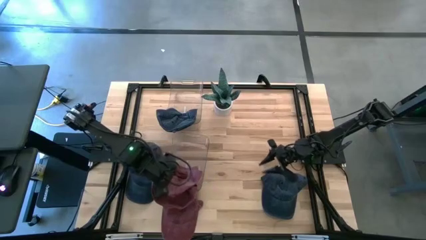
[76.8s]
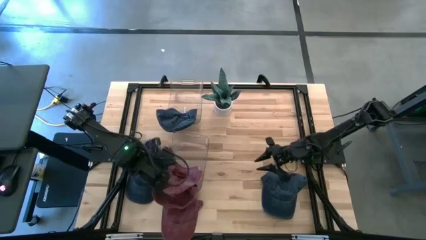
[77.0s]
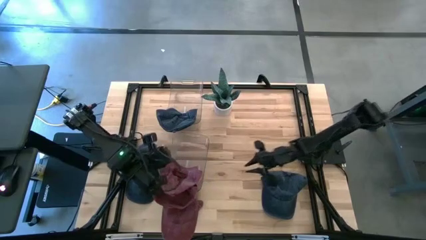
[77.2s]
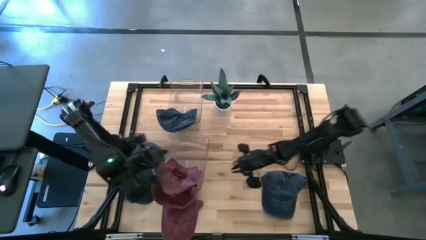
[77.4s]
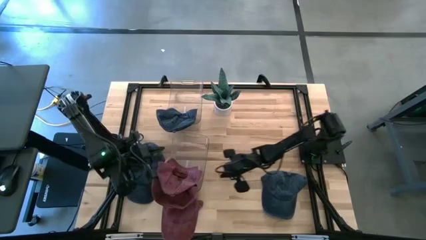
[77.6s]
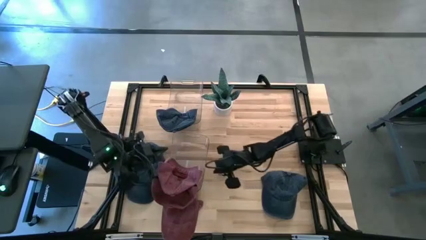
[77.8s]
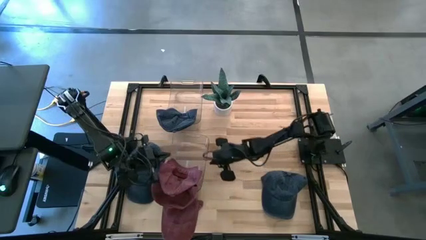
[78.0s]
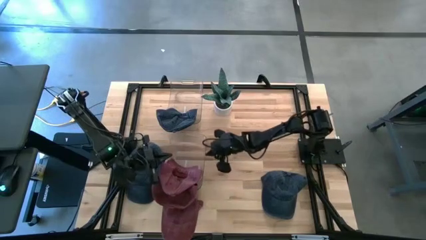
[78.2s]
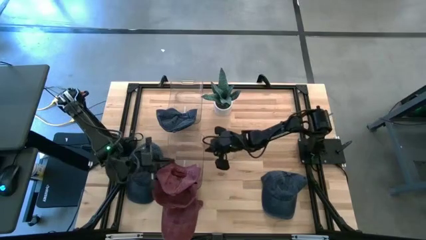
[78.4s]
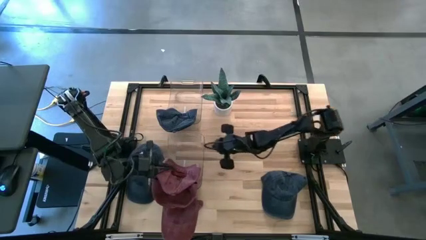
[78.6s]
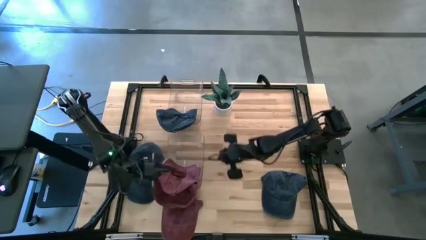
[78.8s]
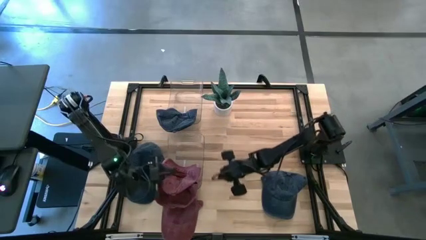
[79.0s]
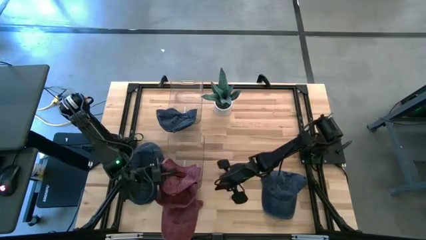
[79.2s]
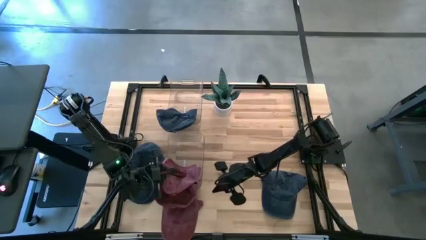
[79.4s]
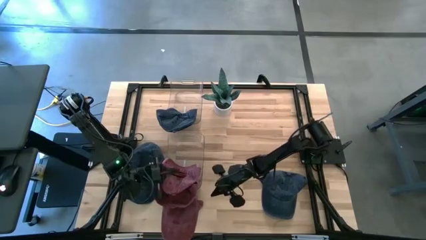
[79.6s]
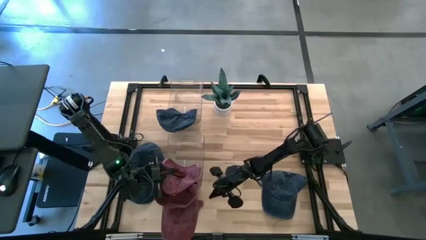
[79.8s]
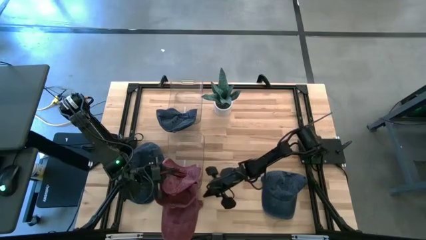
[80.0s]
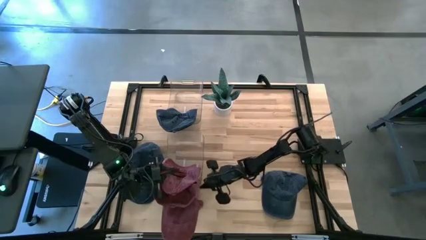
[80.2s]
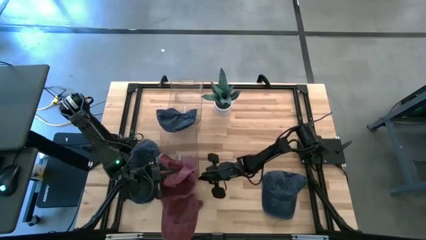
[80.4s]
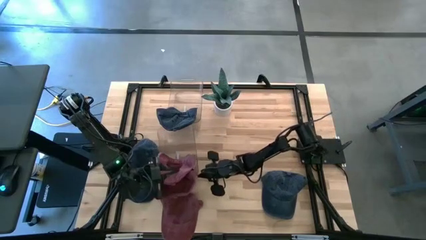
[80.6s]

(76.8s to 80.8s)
Task: Pick & Place hat
Adjust the bottom transparent bin

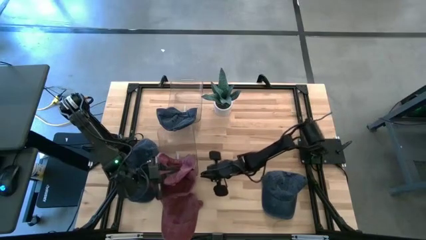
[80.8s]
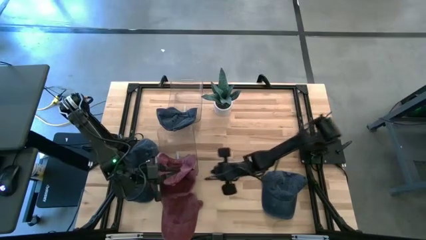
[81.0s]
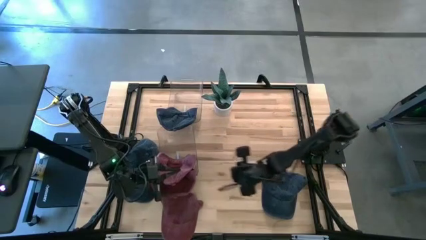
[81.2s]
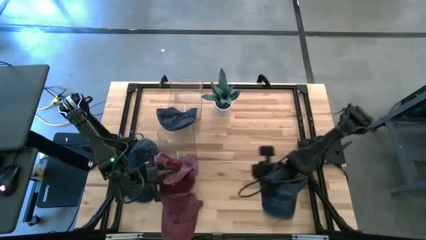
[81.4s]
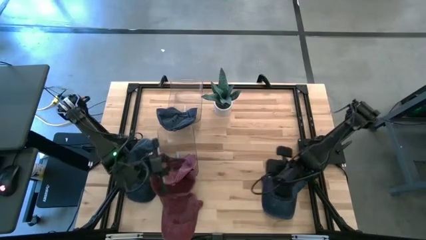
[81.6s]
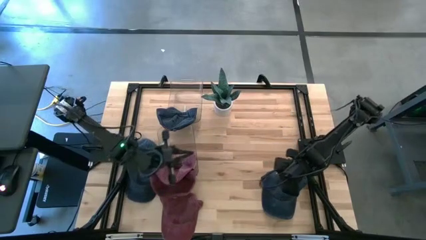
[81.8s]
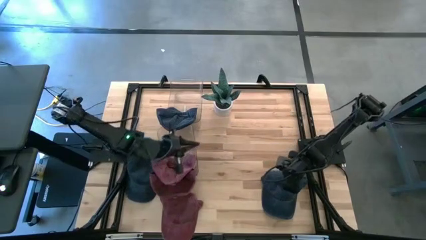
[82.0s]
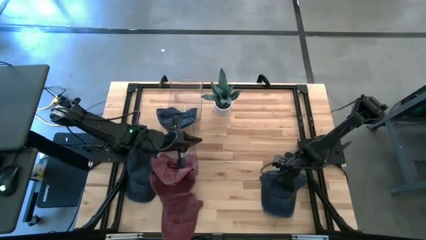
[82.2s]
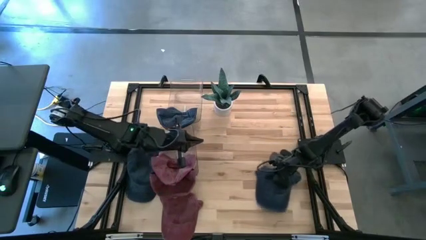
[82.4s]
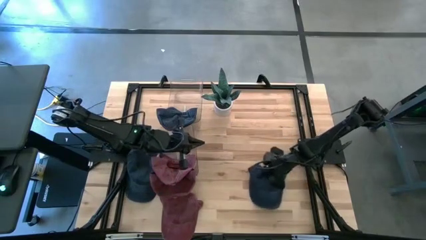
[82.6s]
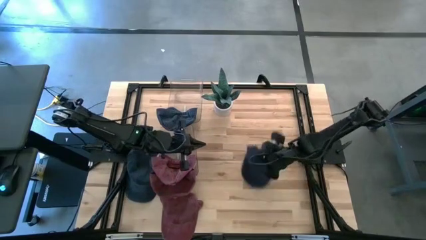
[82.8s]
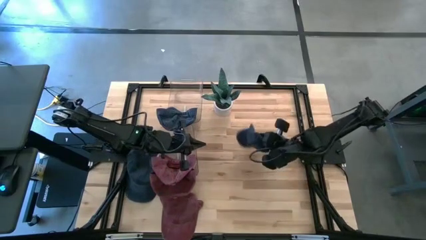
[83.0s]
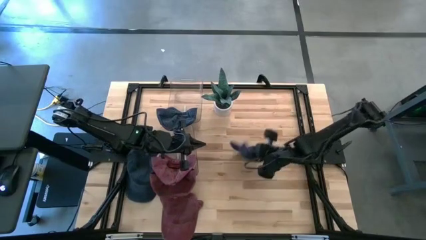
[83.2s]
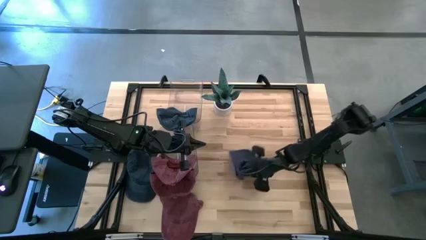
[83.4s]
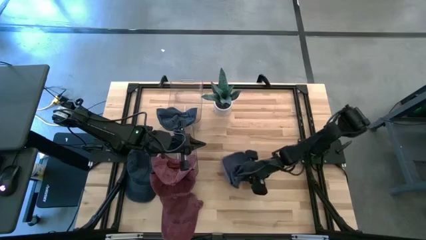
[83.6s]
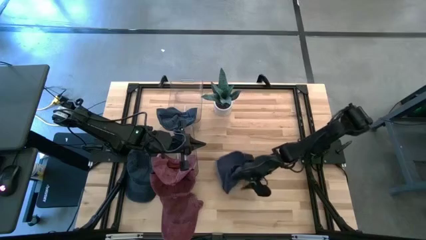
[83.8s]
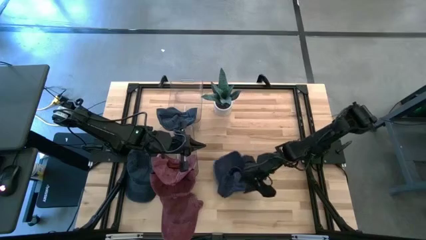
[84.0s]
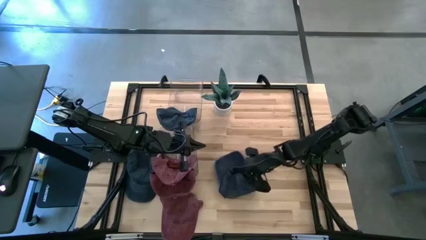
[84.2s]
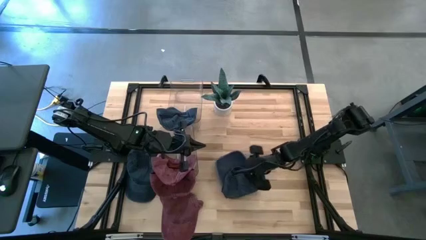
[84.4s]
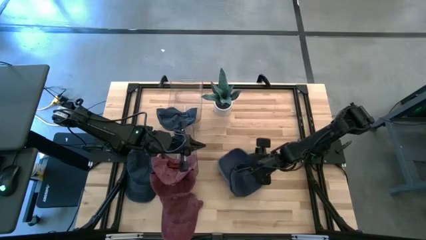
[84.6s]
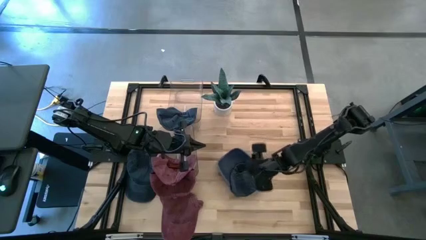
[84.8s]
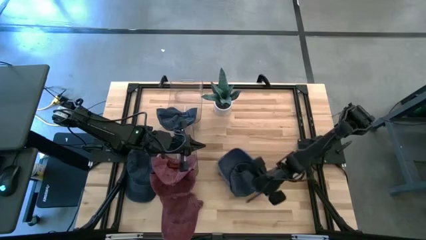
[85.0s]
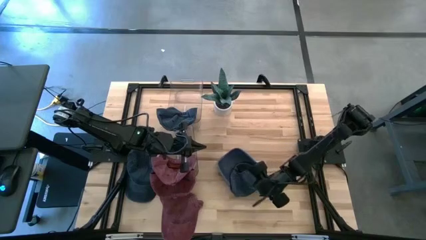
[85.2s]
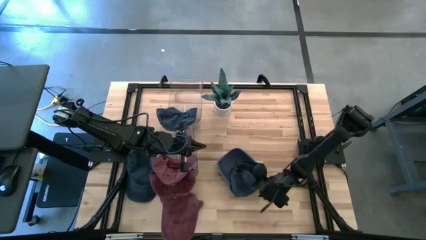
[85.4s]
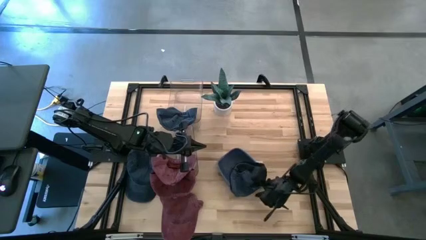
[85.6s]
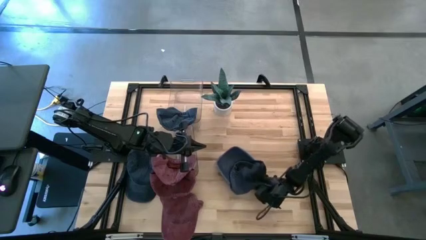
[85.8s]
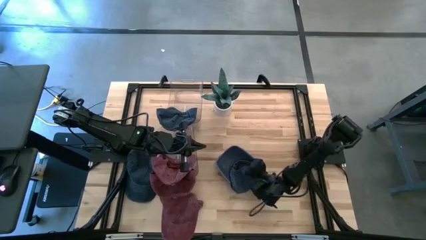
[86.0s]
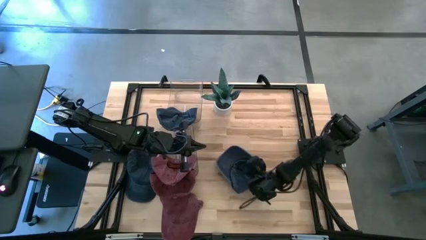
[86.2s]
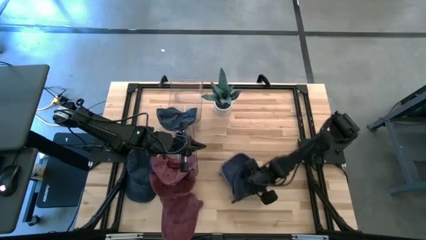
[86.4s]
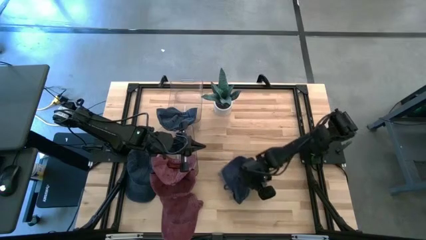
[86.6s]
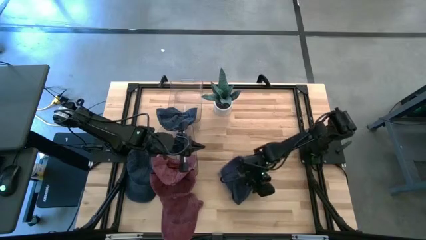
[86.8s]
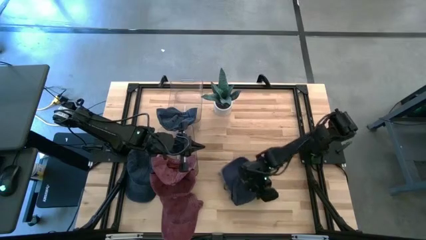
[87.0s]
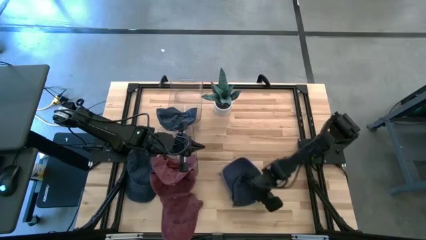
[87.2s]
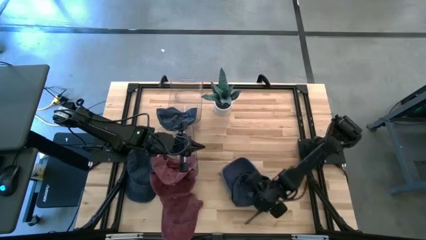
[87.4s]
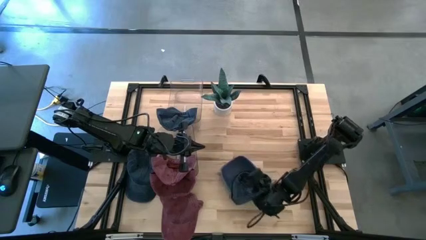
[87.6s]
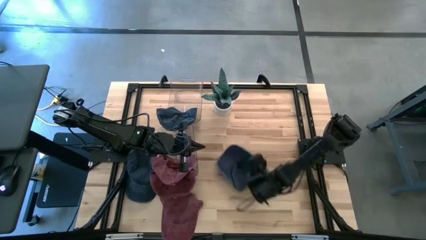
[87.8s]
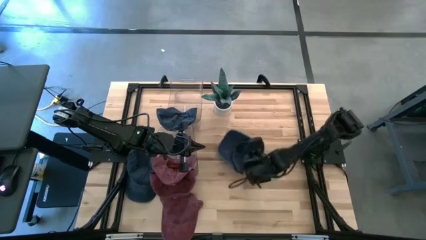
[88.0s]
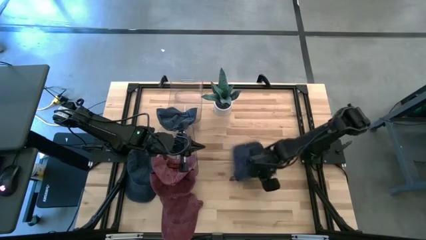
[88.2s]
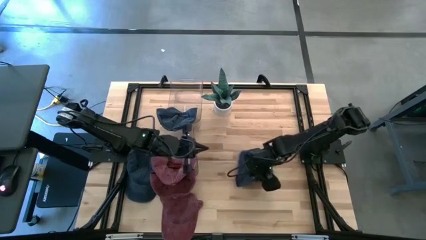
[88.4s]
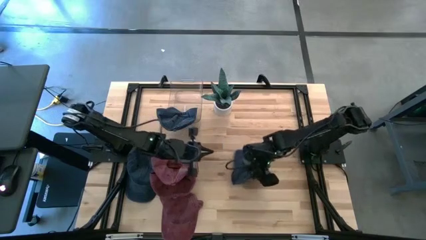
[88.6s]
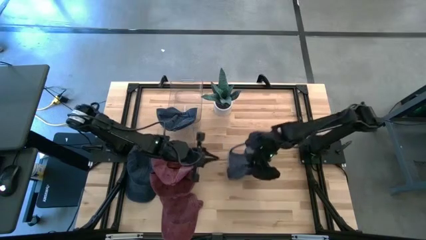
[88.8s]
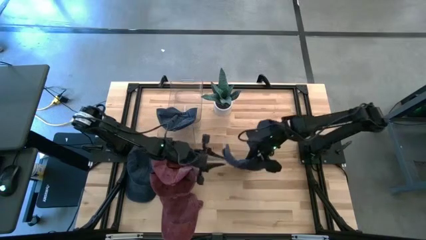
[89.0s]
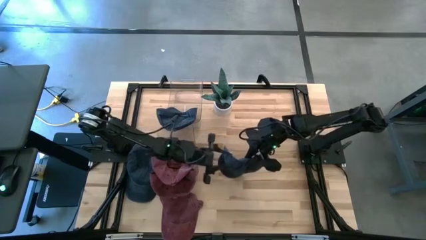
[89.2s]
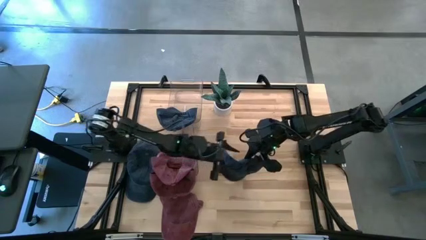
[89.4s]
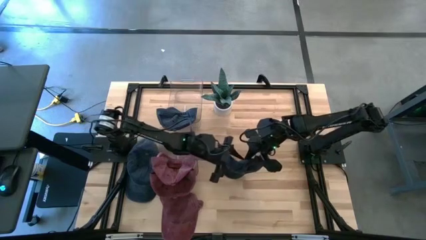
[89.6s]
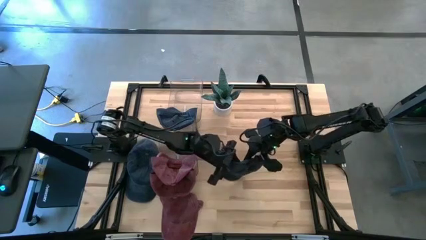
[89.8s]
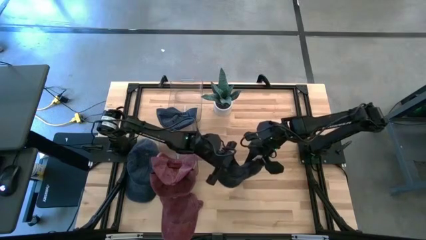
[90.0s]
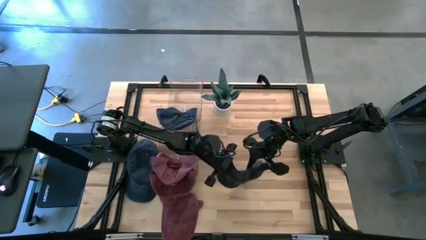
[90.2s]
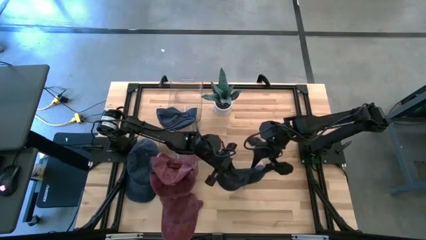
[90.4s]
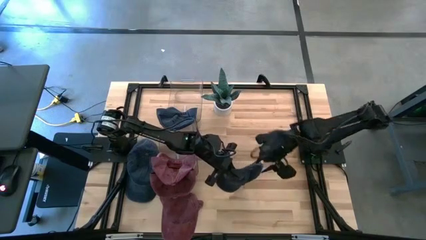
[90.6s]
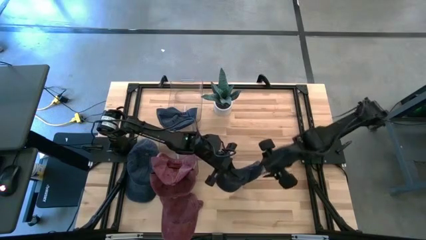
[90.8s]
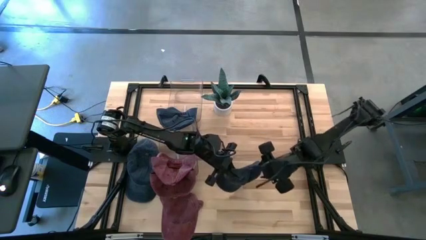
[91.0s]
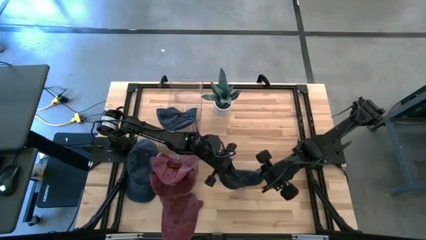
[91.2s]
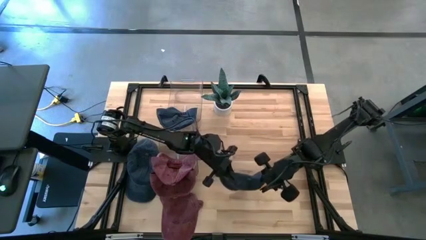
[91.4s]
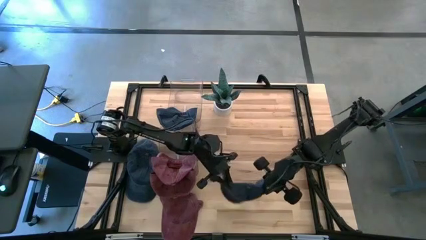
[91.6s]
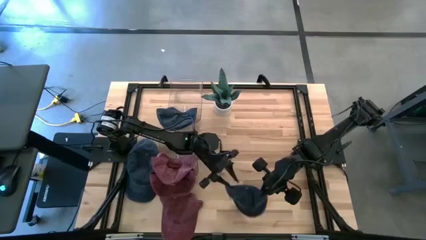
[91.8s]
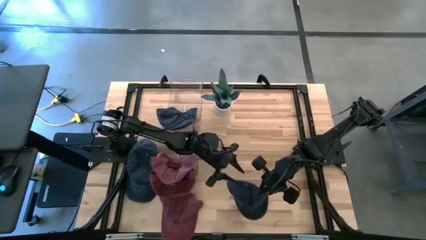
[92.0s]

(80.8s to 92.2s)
Put the right blue cap into the top transparent bin

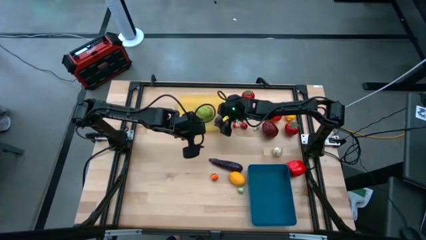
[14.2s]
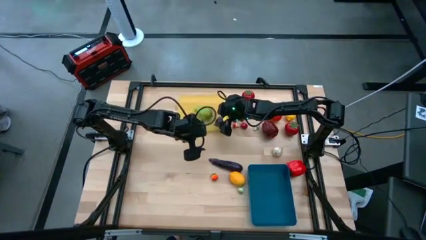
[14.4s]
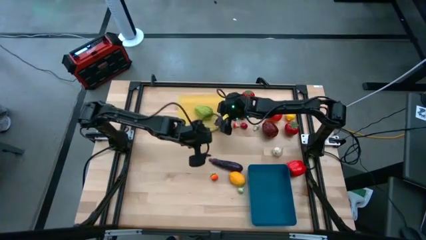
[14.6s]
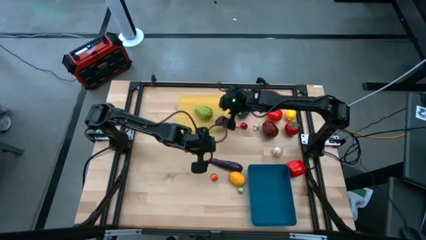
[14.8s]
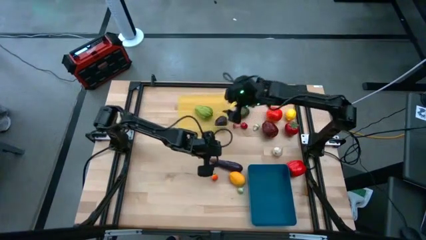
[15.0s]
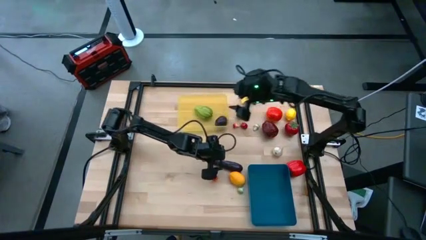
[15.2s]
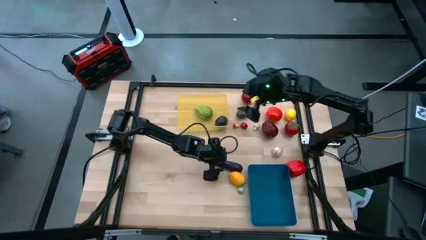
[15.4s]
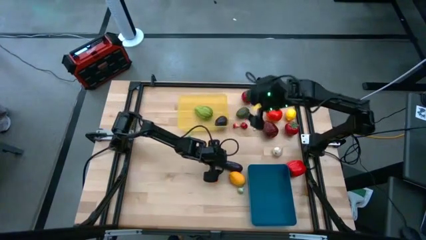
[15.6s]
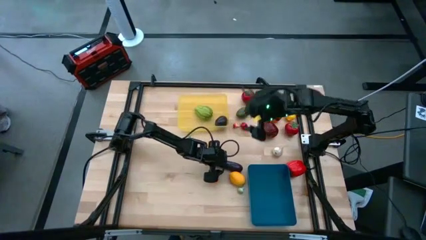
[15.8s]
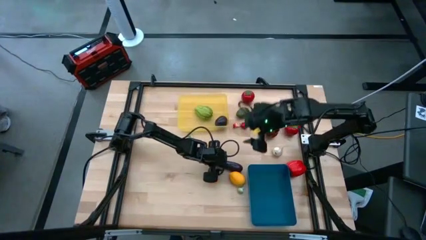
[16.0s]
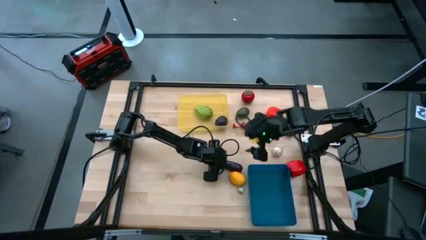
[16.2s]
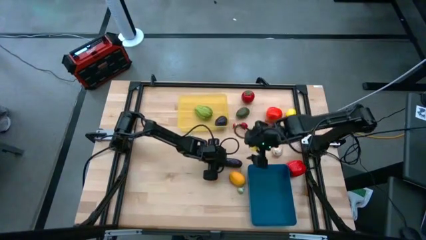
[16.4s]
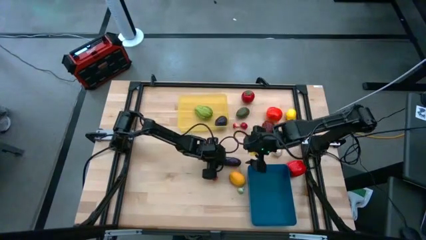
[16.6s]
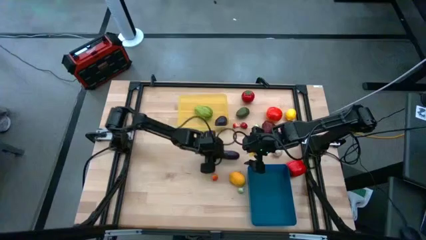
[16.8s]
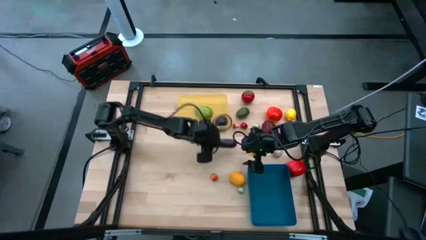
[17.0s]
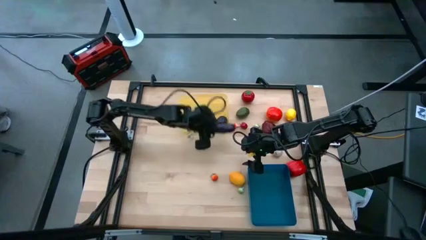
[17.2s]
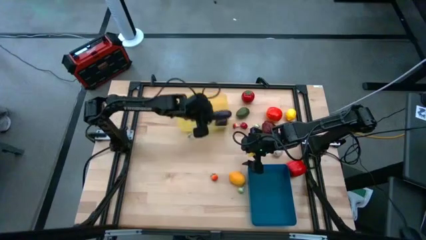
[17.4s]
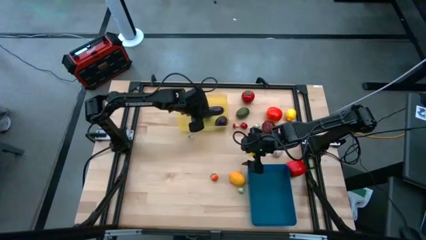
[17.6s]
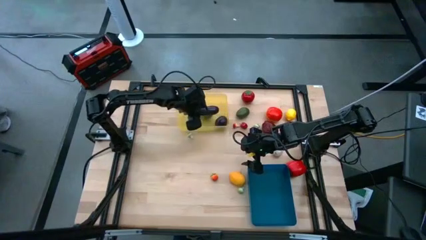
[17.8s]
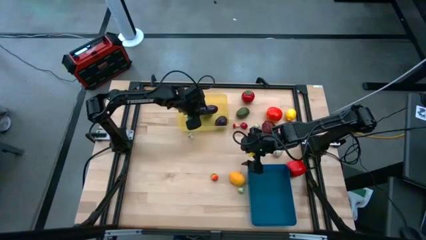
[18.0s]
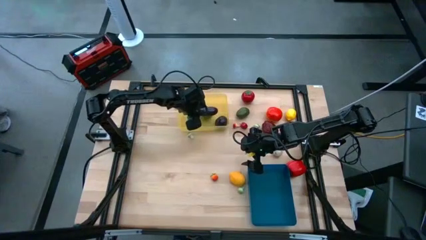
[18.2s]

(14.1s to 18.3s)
Task: Sort produce into baskets
Put the violet eggplant into the yellow bin
